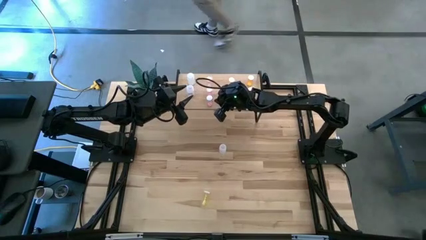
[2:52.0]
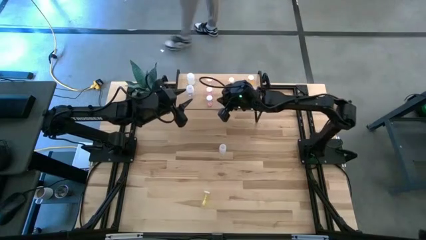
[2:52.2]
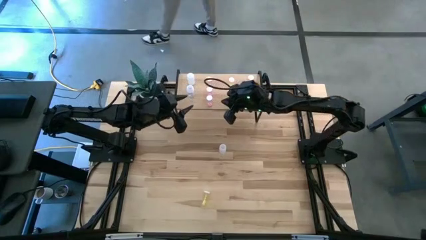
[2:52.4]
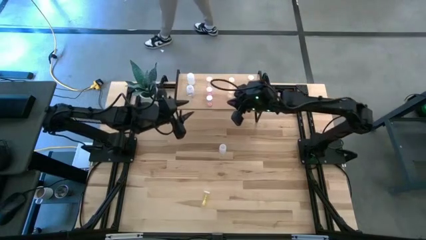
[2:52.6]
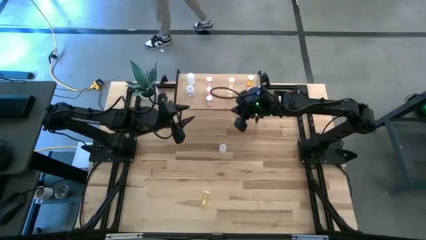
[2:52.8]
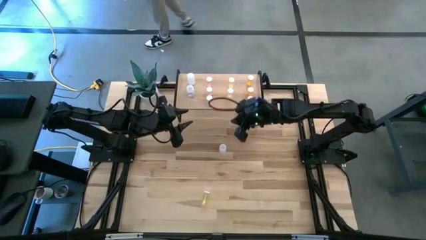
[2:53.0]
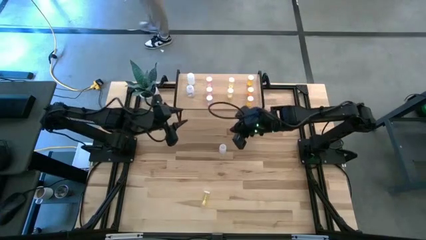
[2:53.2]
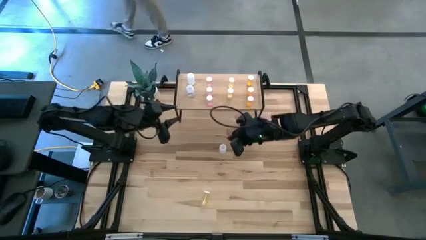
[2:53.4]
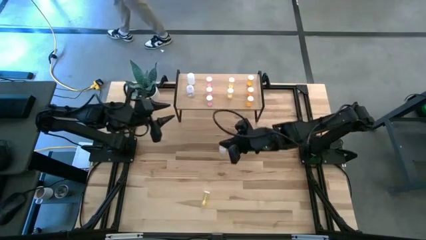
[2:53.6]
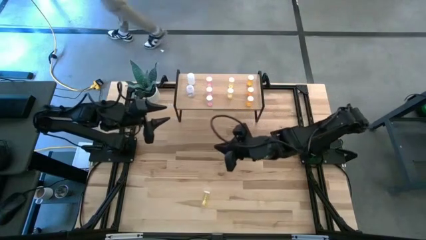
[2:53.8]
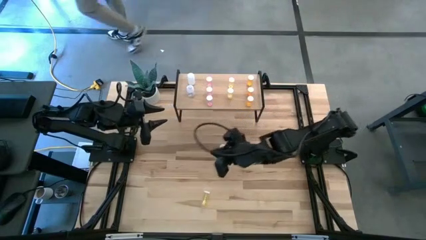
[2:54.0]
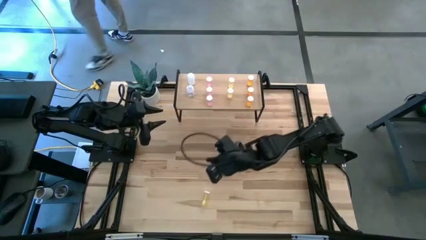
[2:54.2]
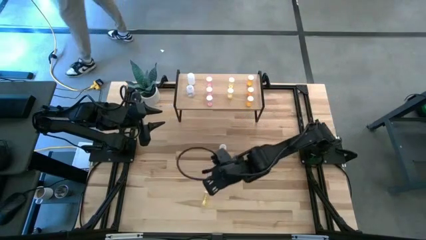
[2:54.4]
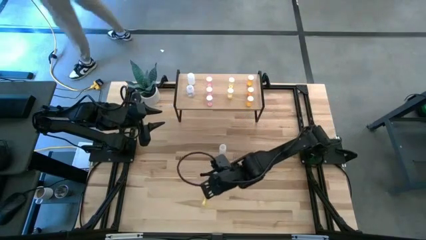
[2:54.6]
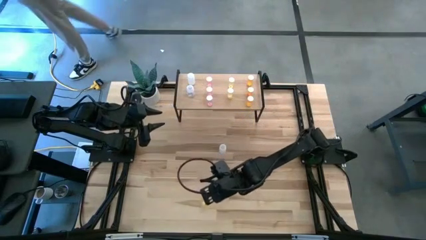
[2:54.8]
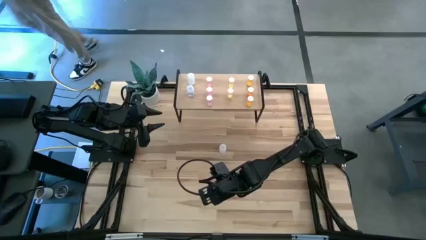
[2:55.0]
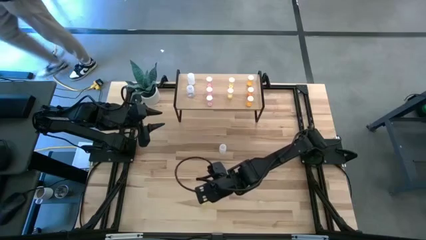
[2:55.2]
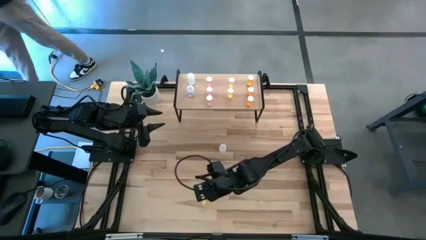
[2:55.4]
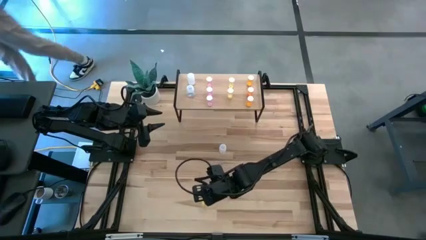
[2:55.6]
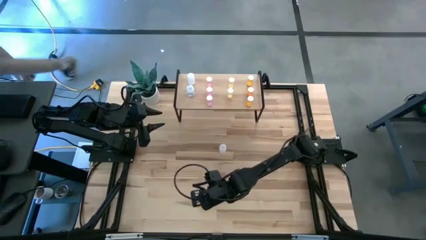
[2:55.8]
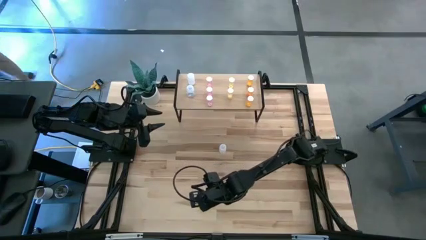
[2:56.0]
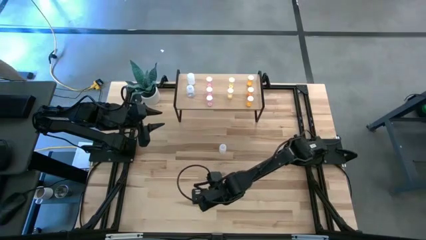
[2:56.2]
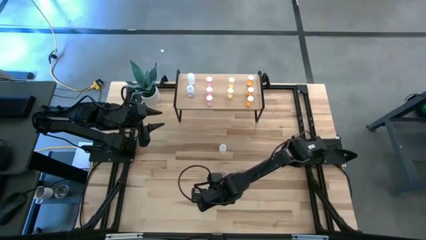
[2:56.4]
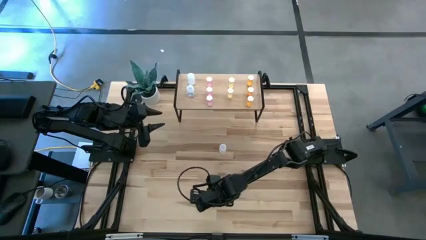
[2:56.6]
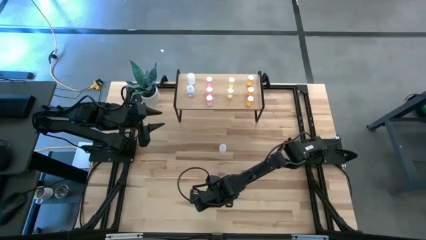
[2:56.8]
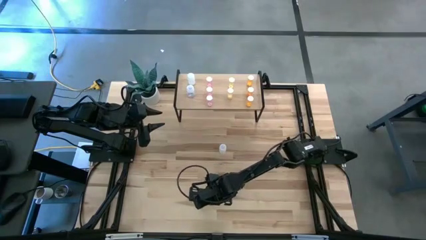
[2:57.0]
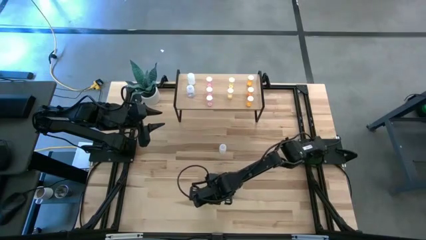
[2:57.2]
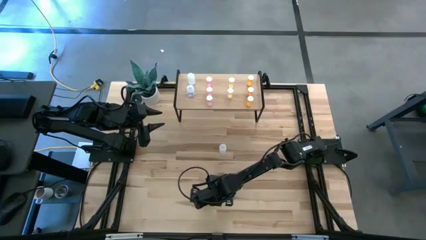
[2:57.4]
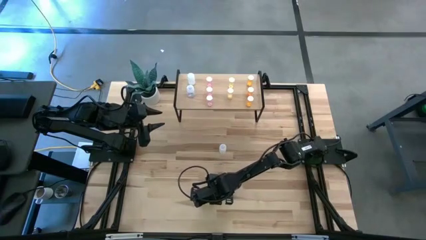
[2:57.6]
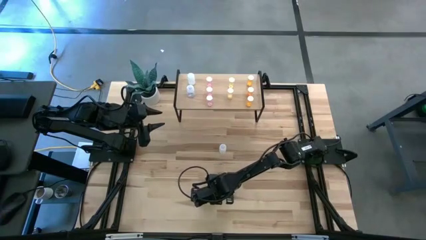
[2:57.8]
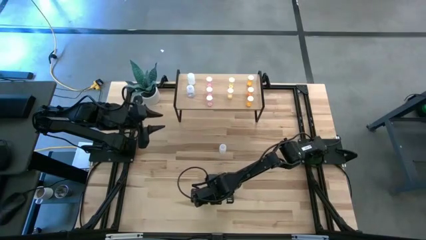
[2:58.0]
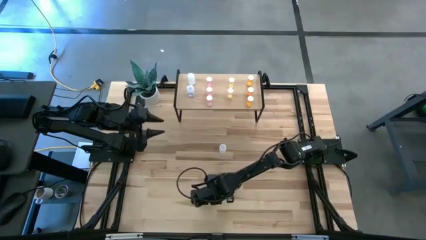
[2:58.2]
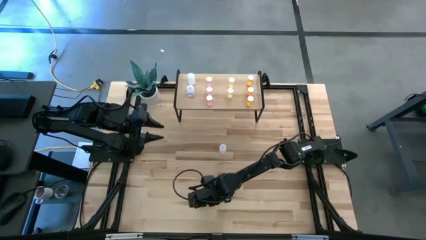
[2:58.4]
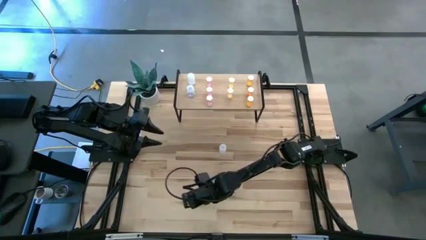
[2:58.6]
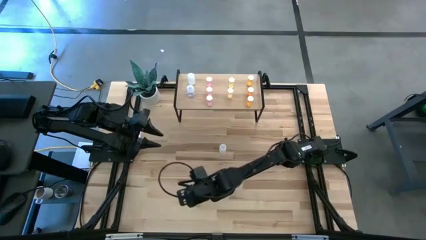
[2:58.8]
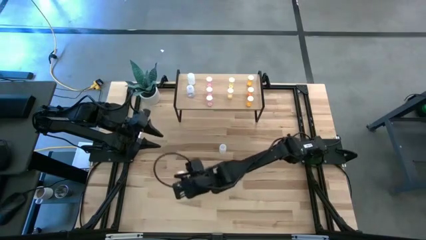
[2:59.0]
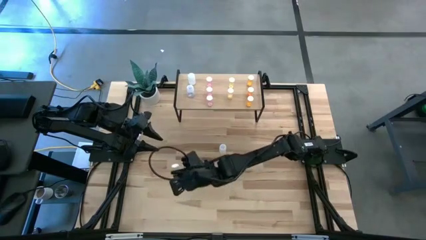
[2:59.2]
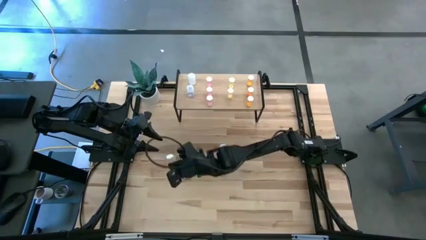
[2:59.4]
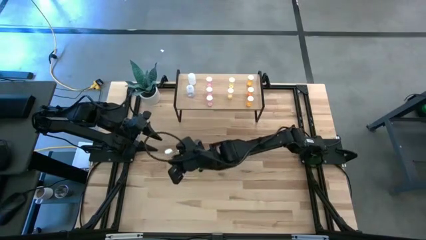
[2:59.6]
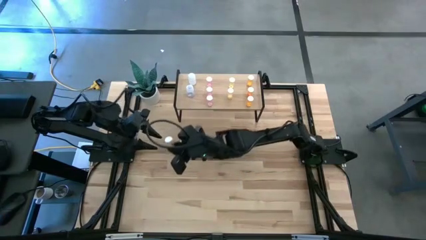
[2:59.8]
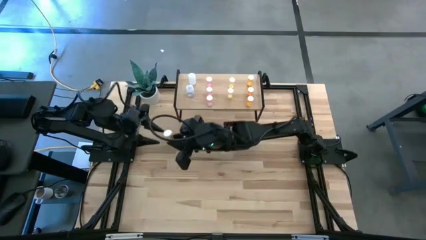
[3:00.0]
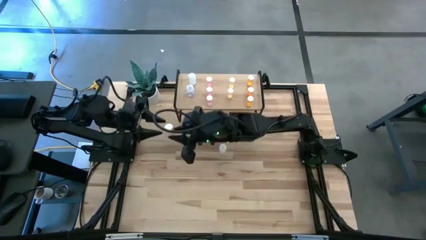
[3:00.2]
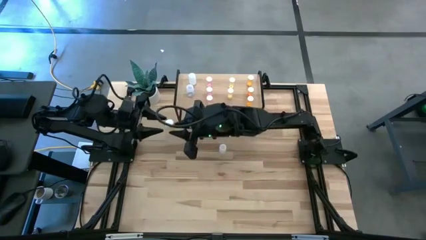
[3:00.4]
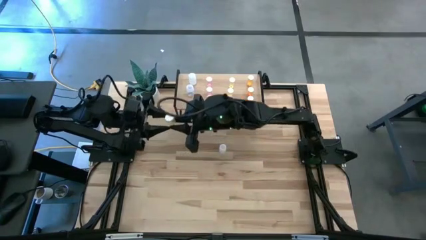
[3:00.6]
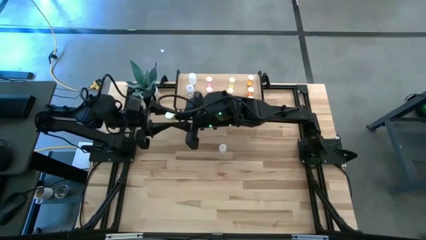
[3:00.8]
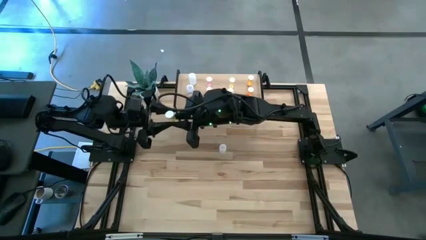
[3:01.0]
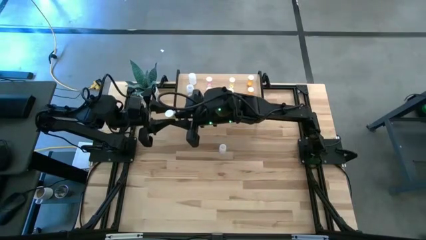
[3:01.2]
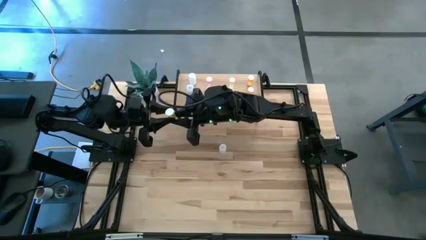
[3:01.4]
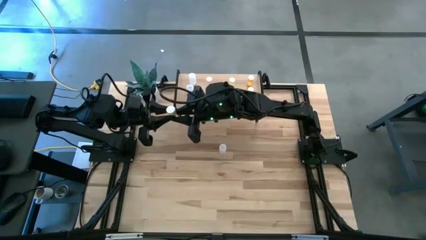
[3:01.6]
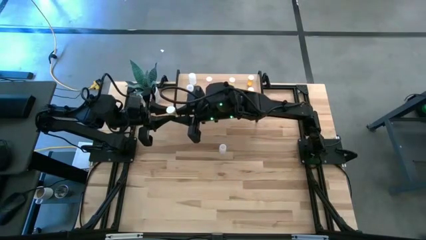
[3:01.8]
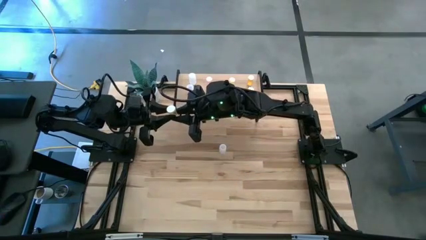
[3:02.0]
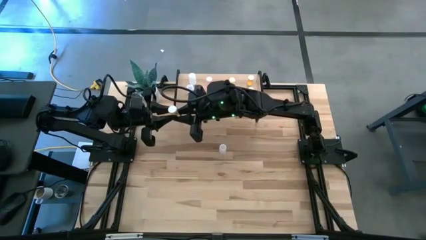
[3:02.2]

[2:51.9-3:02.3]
Task: Pick and place medicine bottles onto shelf by color
Put the yellow pill bottle aligned with the other yellow pill bottles on the shelf
